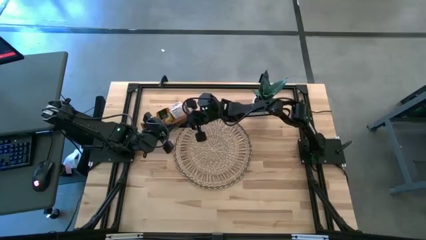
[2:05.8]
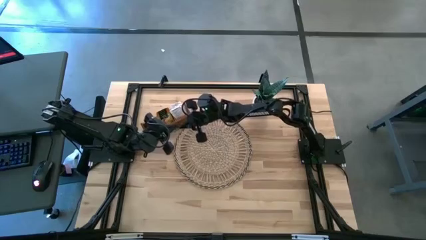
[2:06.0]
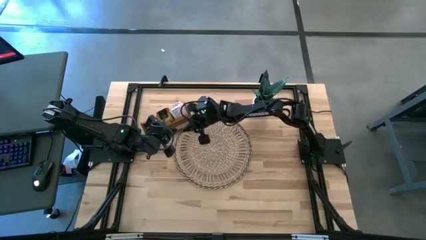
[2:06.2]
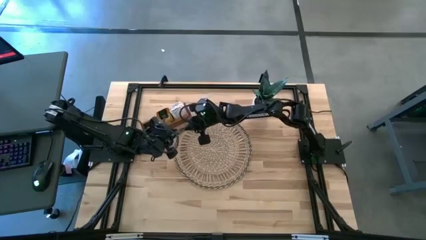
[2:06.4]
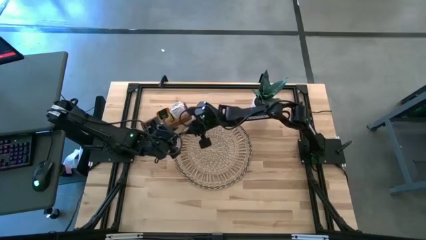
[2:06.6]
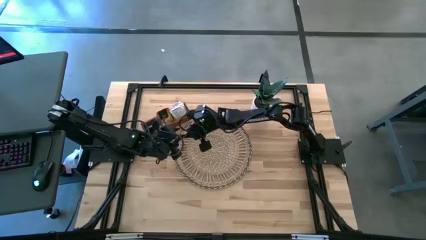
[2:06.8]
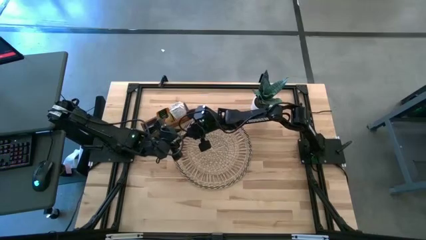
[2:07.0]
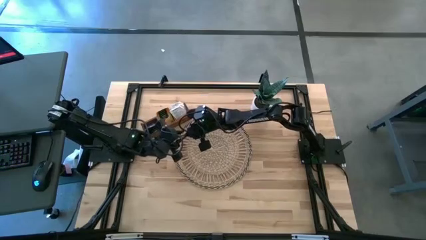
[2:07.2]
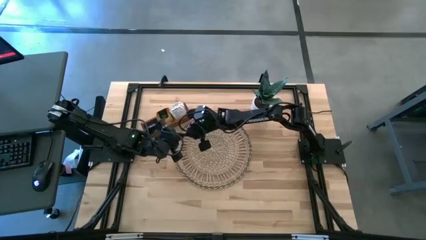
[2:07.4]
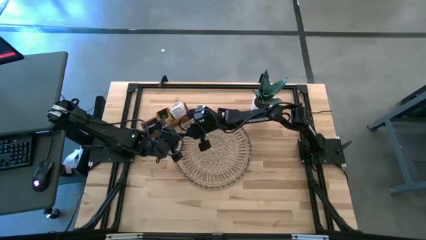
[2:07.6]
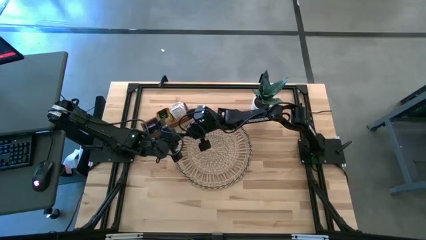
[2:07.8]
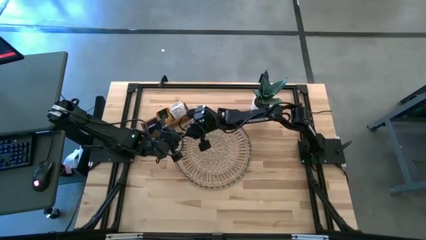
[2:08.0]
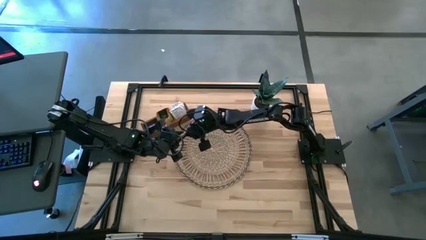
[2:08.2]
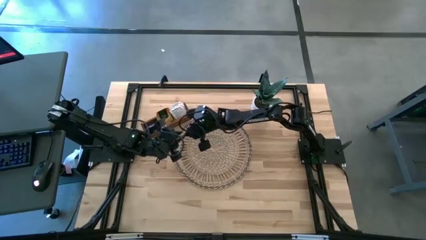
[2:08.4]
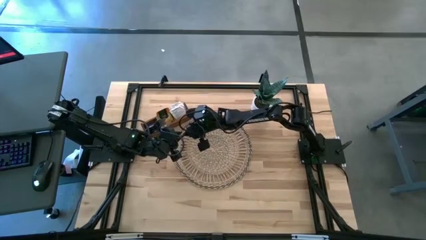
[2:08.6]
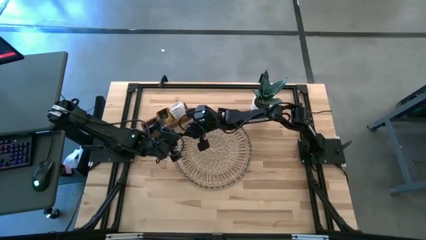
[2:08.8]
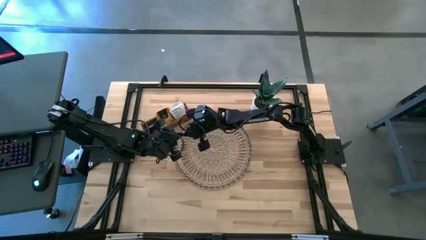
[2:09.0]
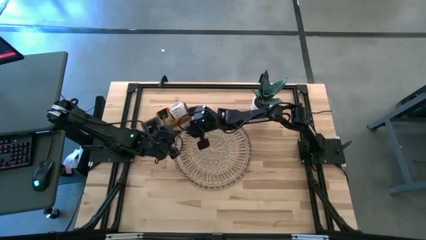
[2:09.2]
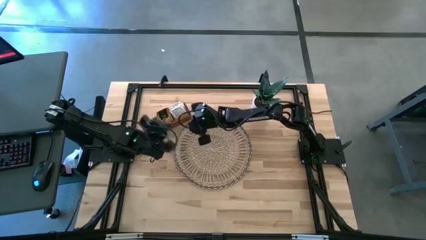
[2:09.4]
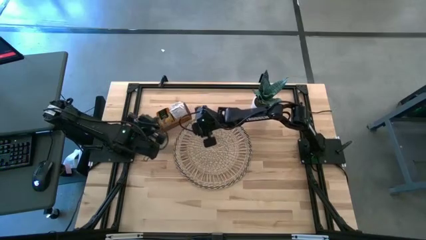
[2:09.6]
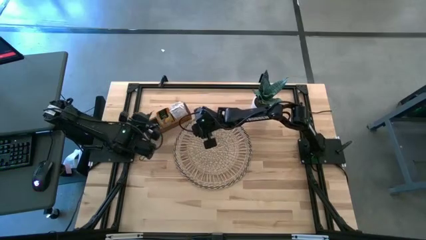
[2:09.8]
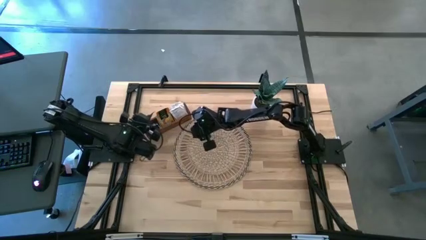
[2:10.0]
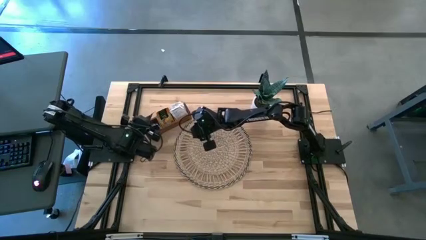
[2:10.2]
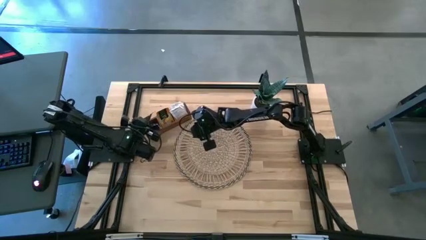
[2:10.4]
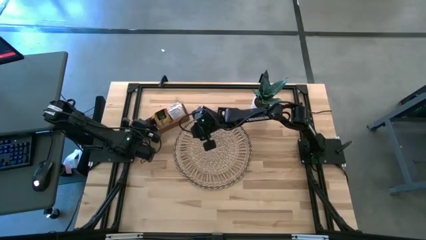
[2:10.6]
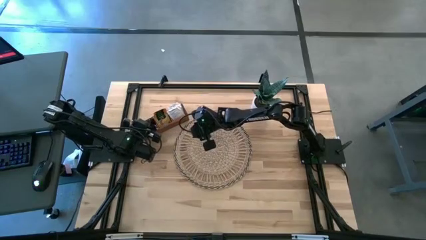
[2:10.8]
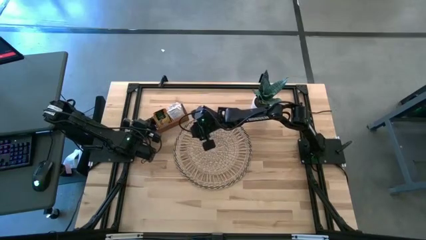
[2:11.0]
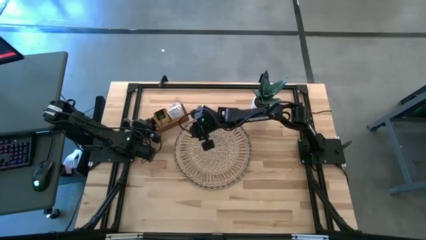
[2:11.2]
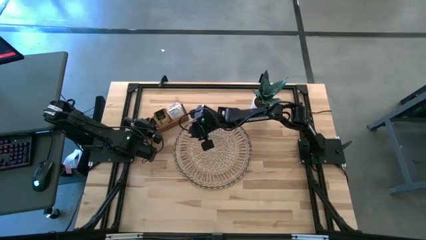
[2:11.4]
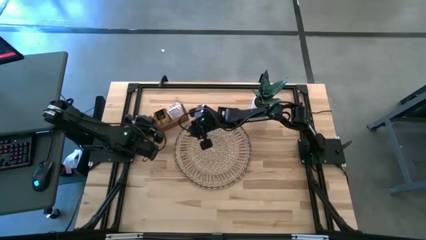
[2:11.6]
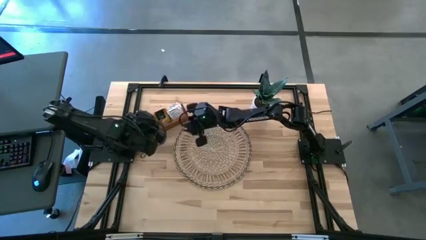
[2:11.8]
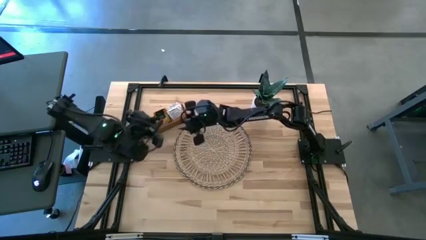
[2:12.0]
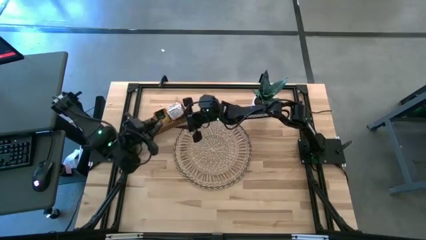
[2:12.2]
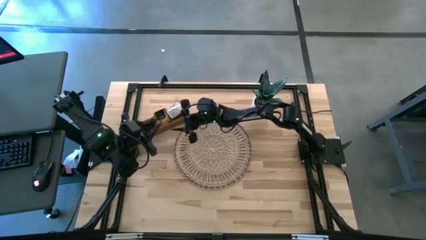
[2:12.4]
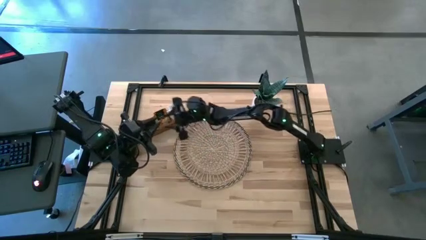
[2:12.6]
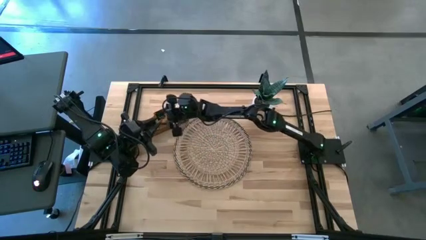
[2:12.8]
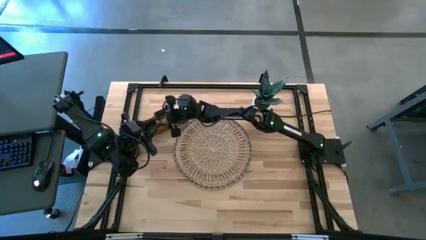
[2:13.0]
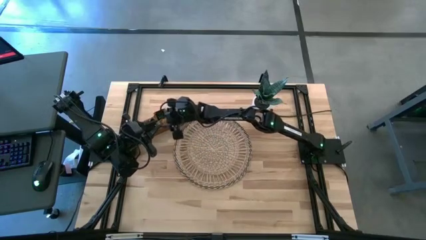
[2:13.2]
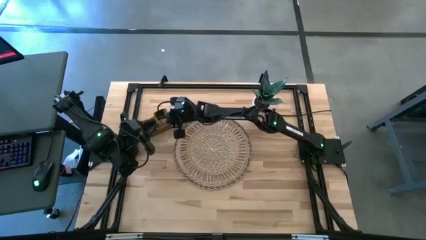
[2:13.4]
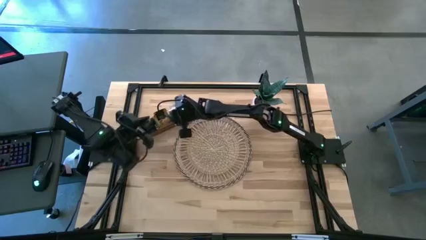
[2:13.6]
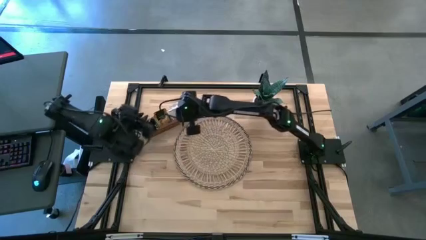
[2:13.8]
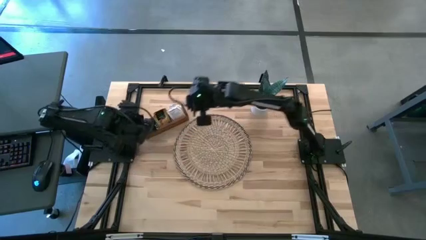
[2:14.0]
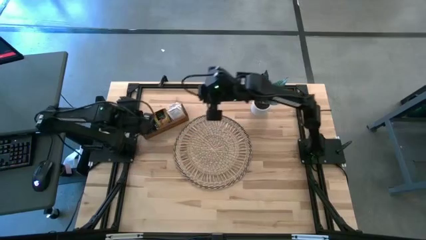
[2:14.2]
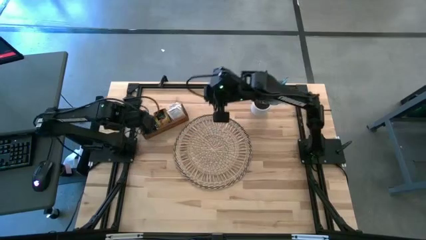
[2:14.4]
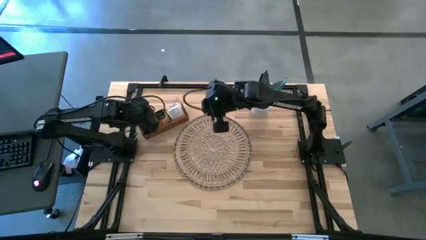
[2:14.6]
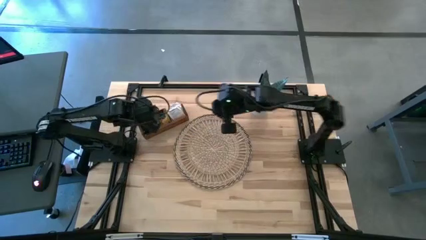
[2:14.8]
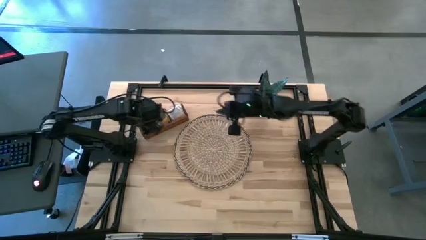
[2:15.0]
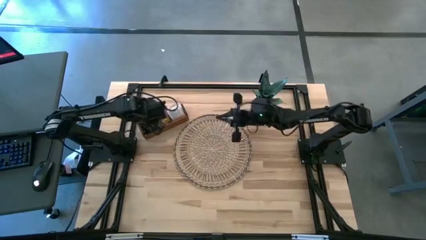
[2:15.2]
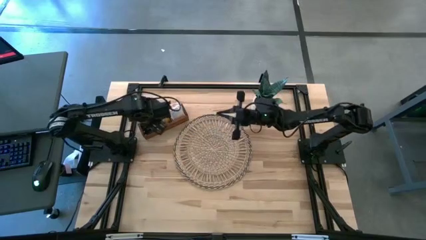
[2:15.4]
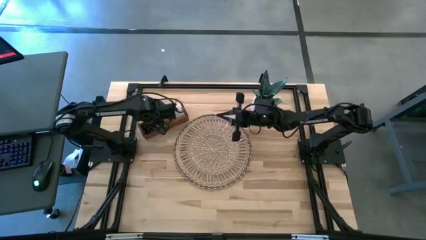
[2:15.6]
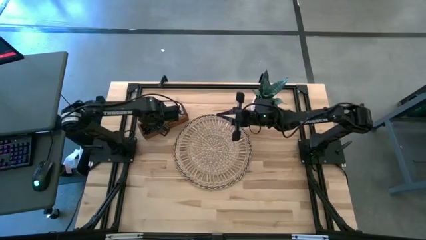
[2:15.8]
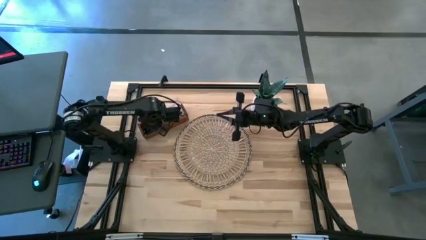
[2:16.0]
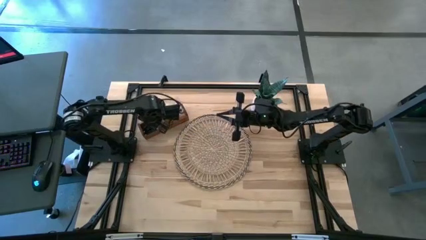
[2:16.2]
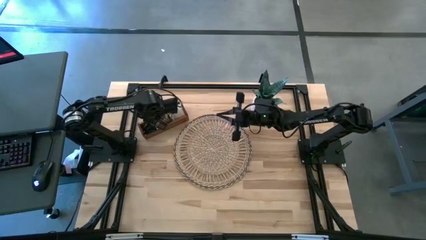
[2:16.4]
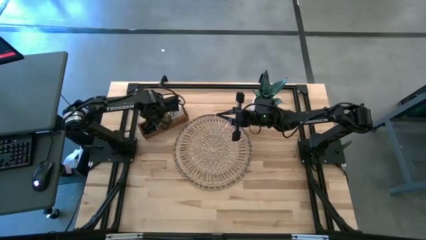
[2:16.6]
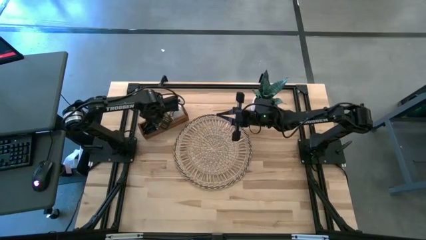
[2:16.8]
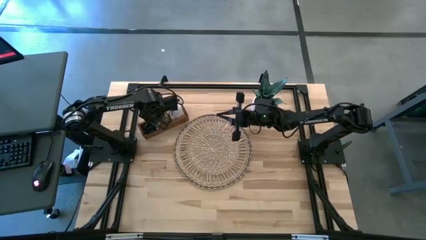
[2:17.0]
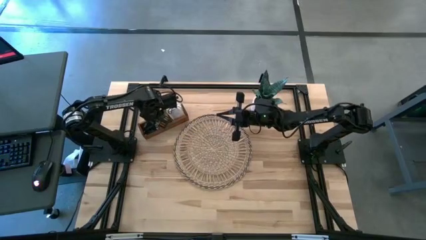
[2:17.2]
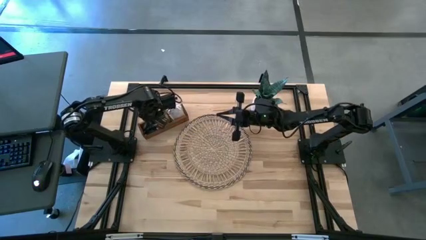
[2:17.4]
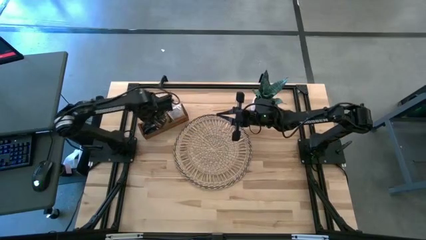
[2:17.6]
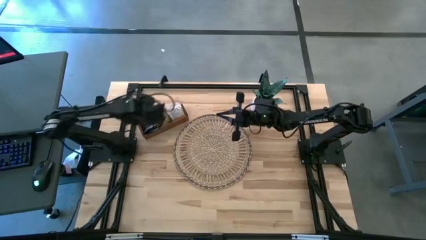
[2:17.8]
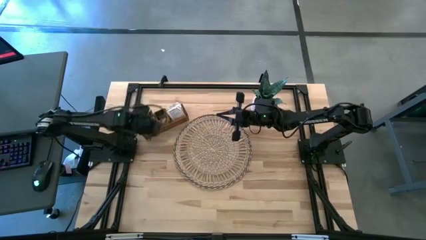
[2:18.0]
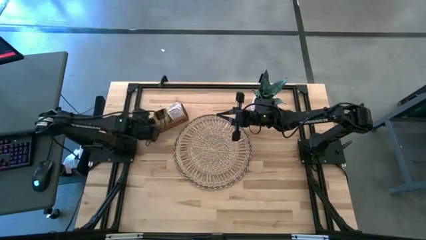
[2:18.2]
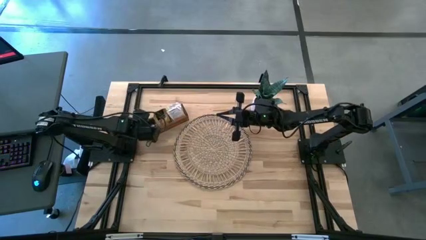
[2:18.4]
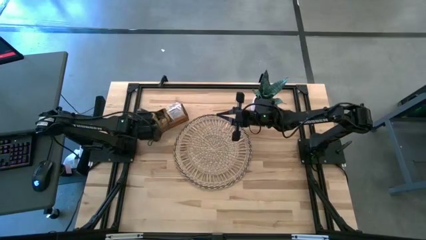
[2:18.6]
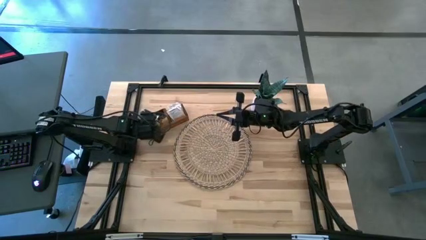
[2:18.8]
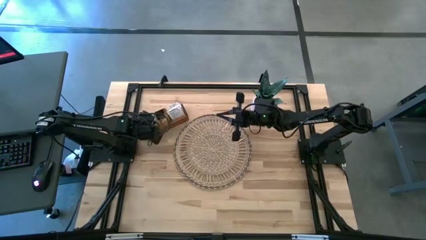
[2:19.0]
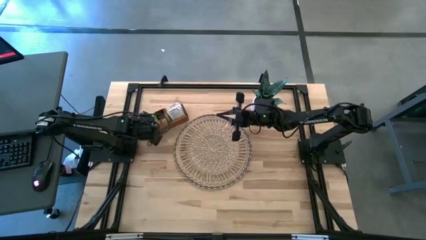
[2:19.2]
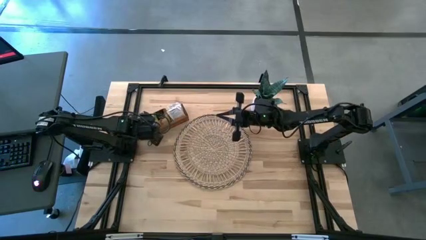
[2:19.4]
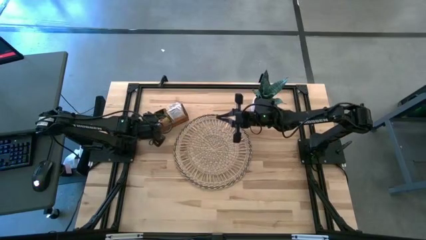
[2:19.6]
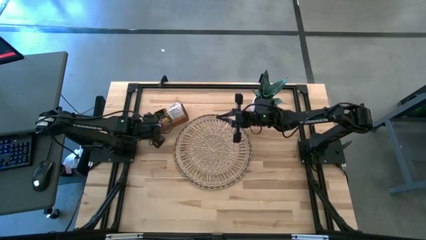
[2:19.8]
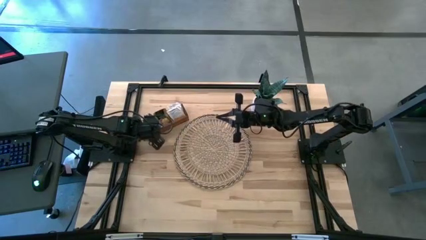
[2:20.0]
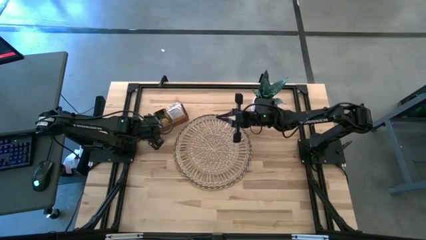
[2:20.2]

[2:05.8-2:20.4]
Task: Pick & Place Tea
Put the black tea bag into the left compartment of the wooden organizer
